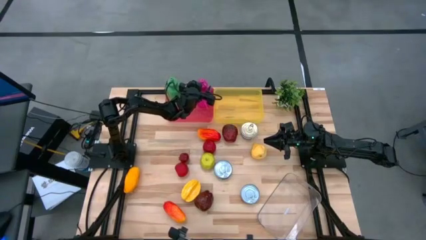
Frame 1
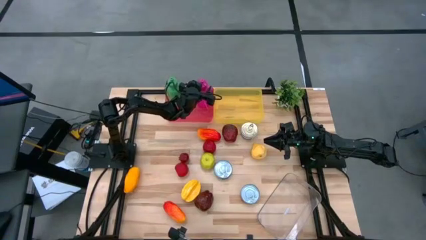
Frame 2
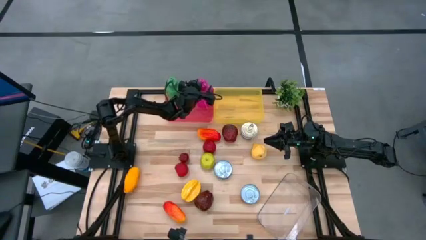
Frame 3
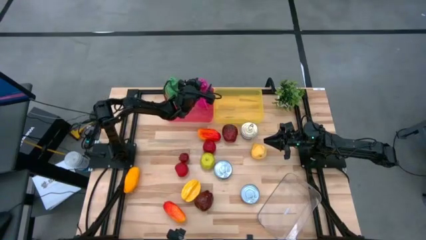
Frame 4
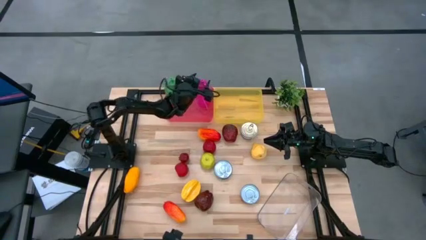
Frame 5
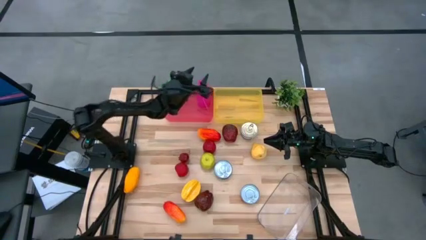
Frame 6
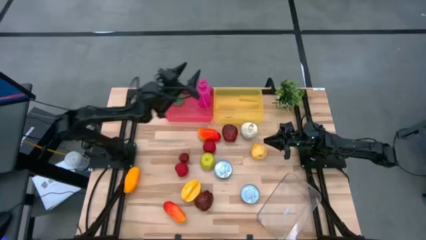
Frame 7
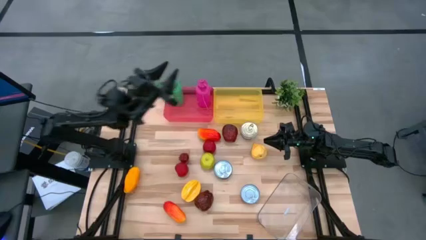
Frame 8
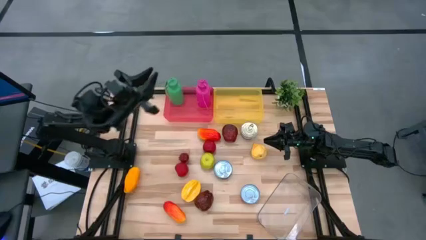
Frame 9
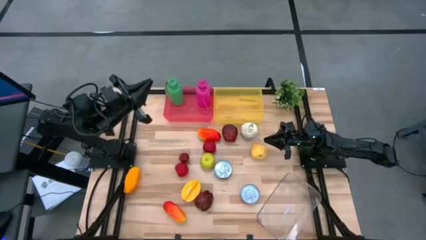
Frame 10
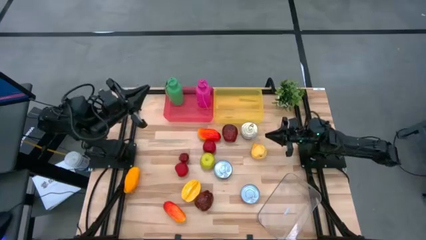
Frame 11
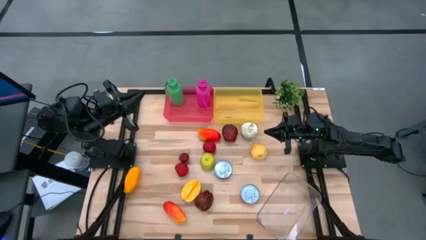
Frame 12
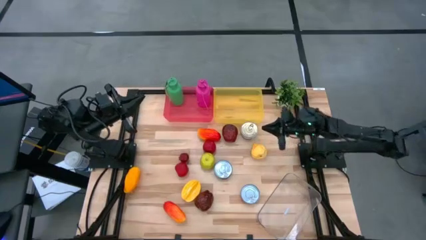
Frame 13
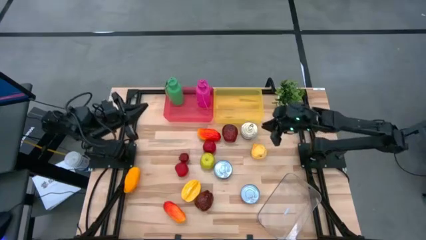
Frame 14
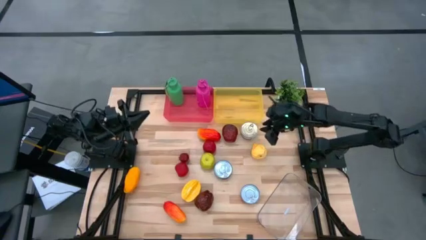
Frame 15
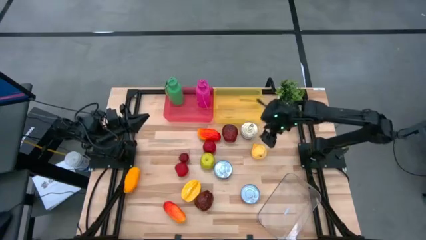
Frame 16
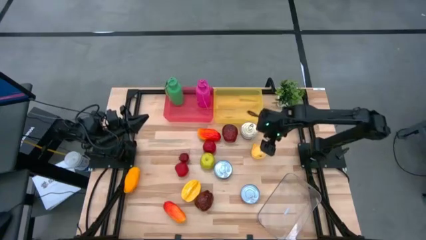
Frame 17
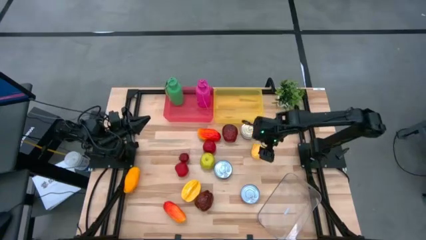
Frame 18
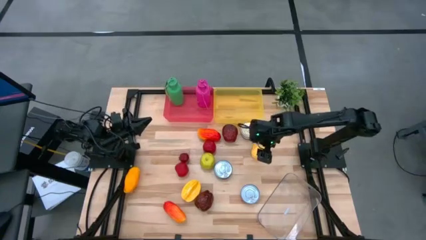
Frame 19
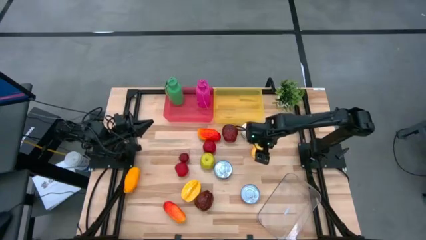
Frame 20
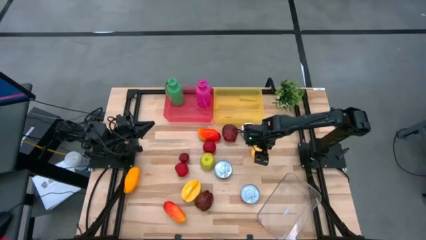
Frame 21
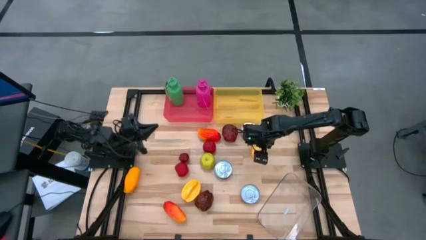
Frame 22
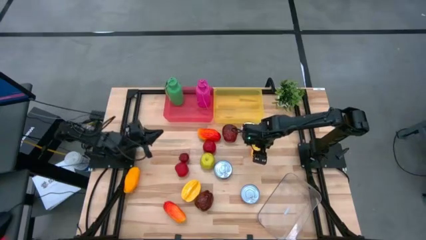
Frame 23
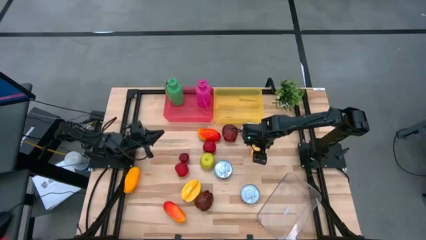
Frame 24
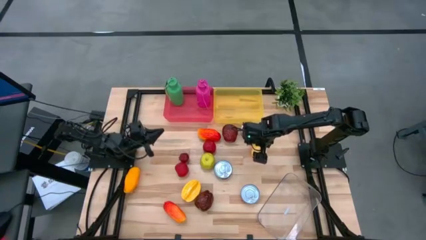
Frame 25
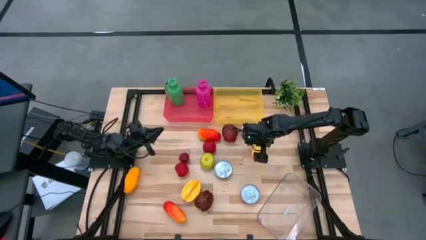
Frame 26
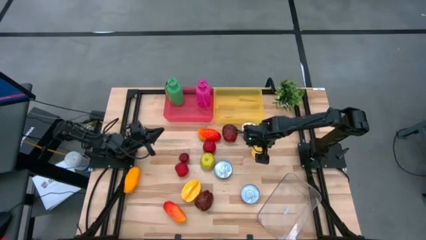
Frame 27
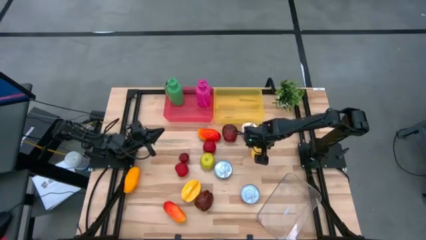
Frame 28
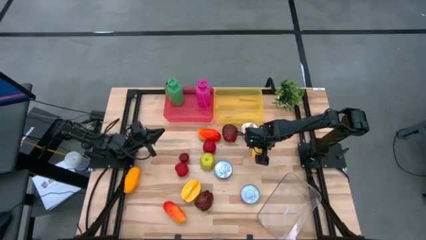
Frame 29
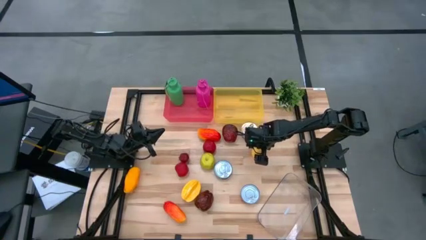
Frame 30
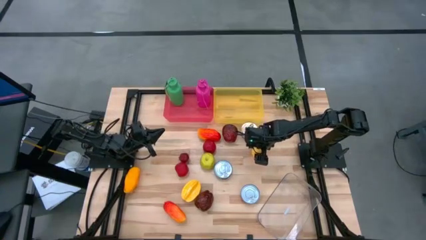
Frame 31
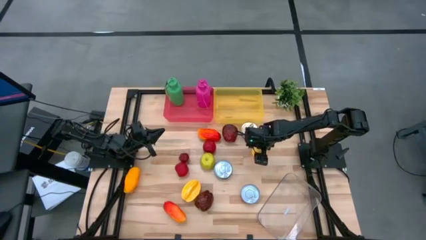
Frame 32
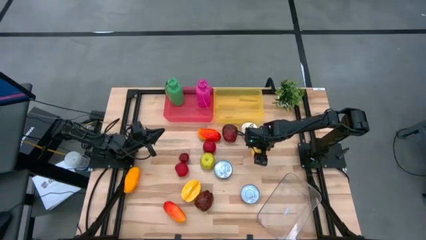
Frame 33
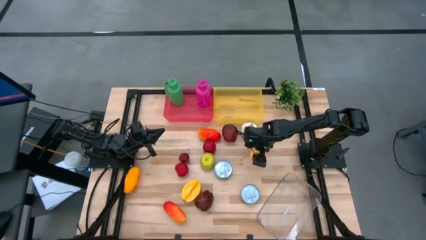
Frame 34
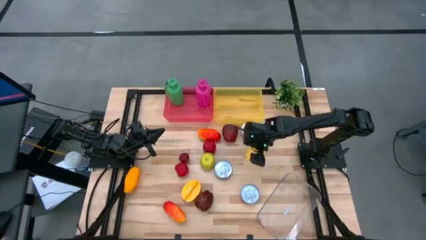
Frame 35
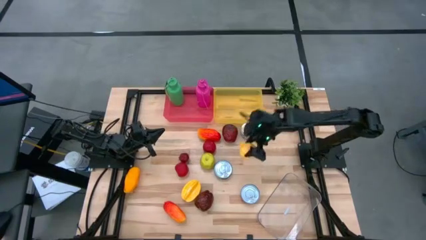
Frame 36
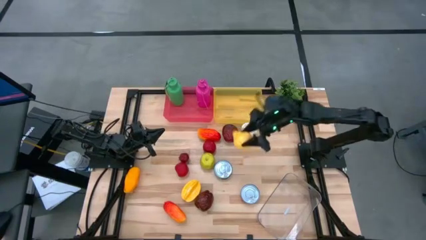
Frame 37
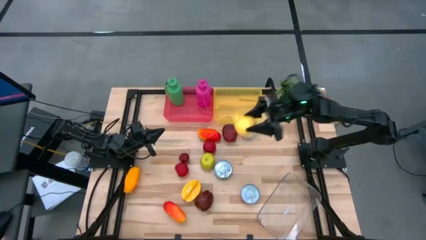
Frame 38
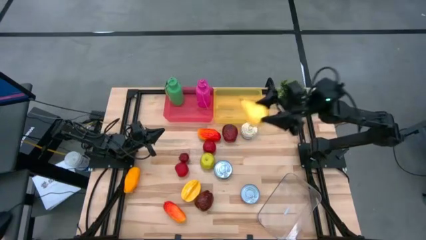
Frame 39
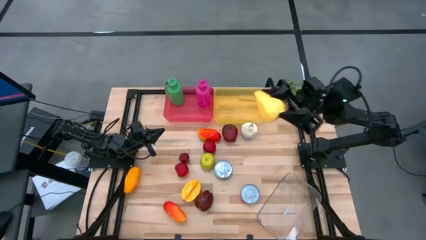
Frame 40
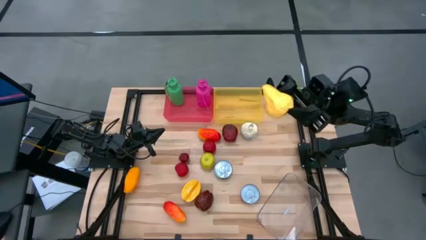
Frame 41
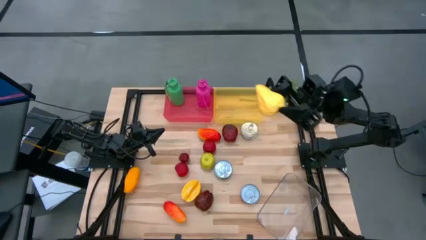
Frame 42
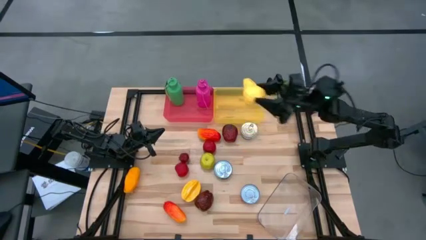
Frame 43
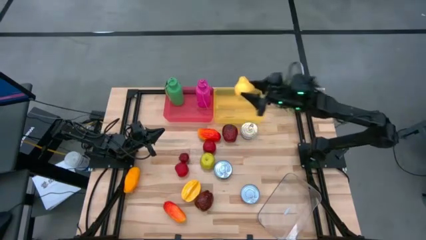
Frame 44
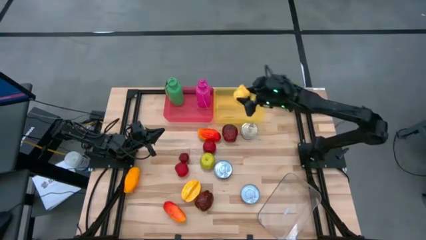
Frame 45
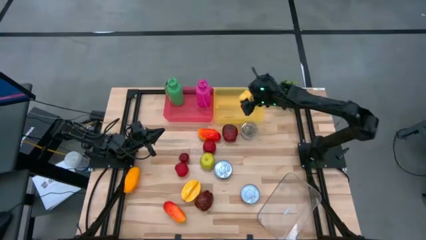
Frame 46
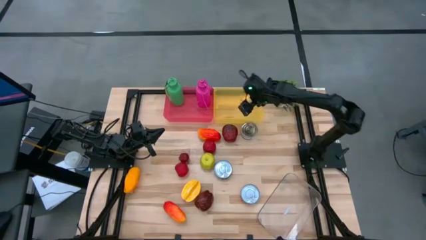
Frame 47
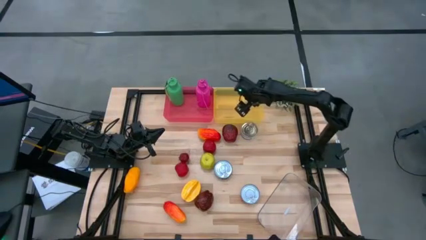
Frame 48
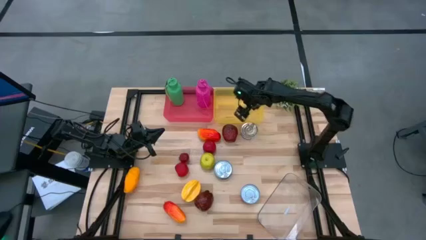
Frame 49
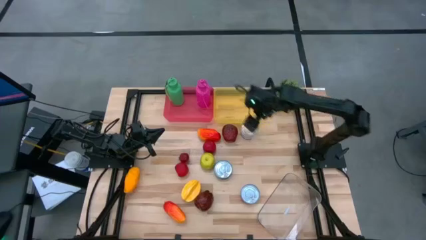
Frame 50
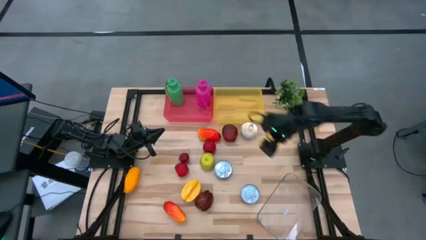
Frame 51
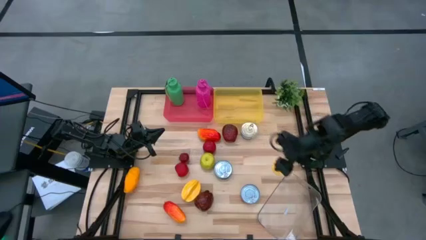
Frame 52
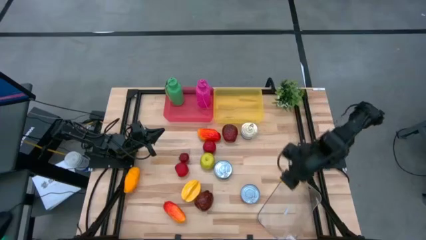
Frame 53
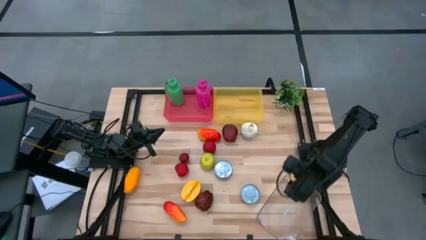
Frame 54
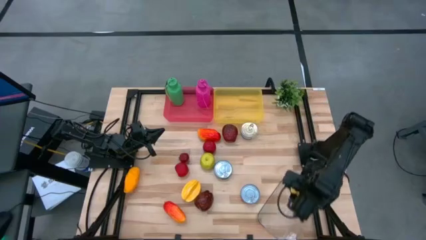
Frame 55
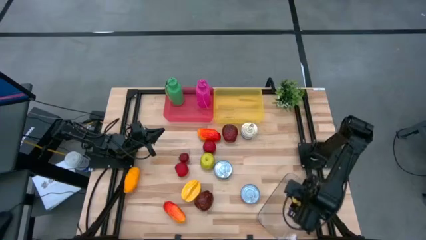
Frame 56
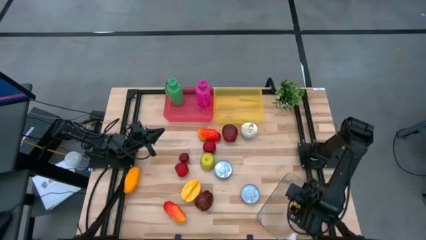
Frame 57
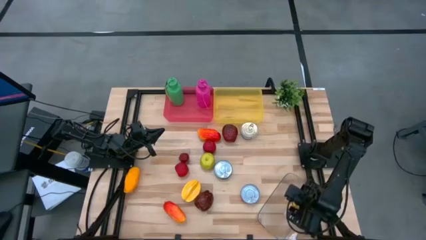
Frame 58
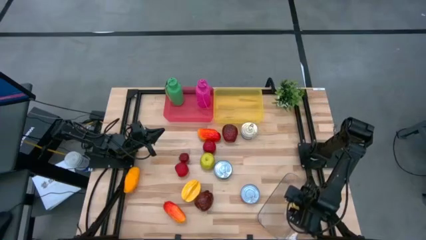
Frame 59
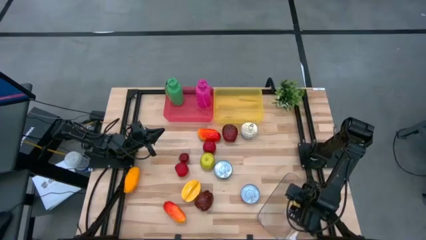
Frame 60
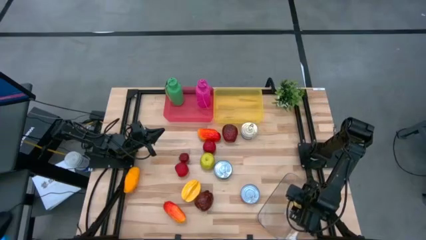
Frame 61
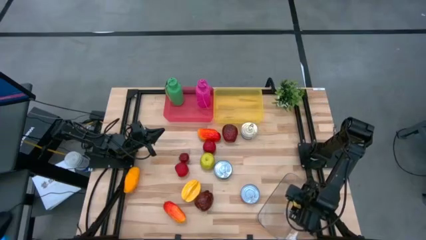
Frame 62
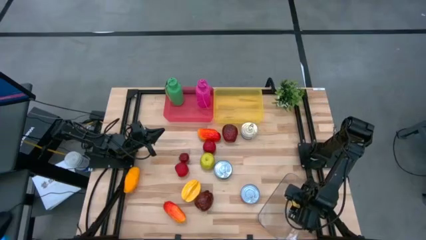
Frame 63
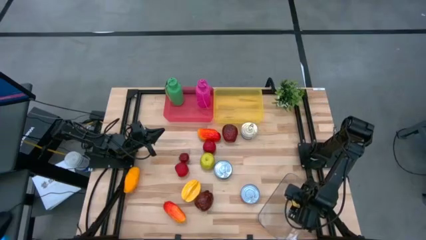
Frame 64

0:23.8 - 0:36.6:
Task: Pick & Place Food Item
Put the pear into the transparent bin
